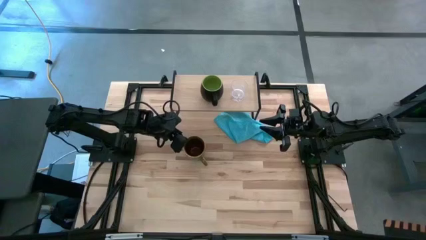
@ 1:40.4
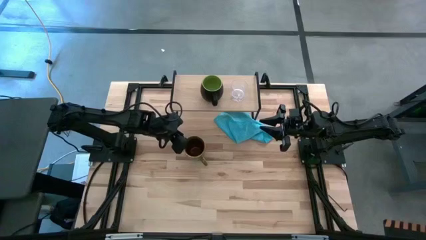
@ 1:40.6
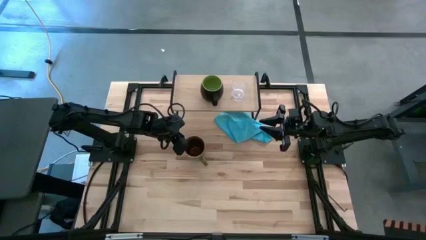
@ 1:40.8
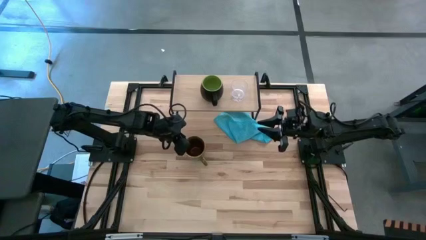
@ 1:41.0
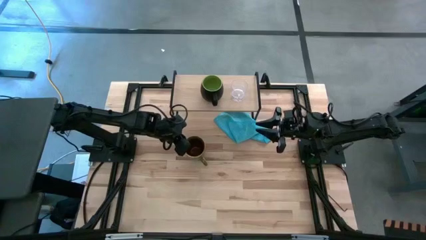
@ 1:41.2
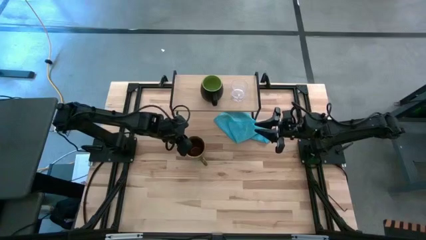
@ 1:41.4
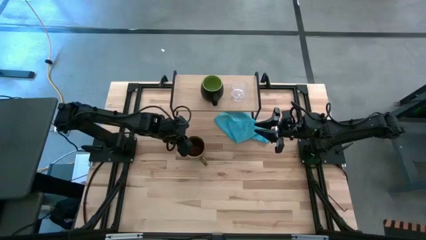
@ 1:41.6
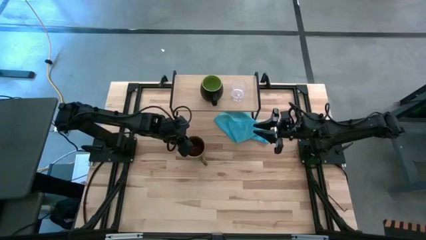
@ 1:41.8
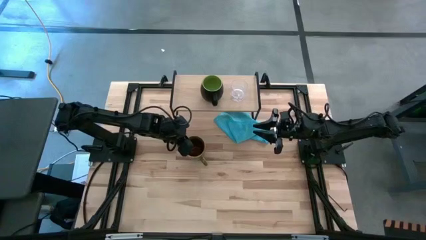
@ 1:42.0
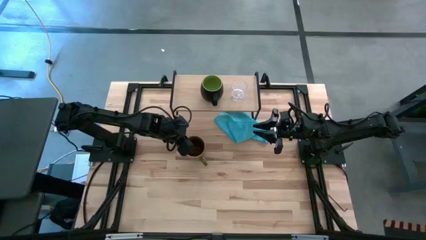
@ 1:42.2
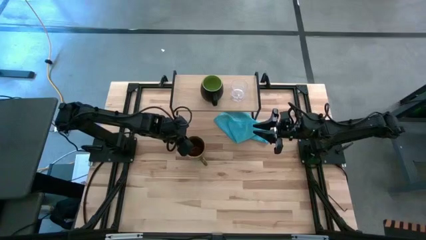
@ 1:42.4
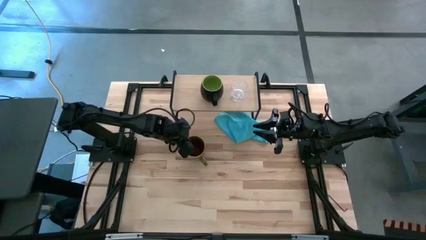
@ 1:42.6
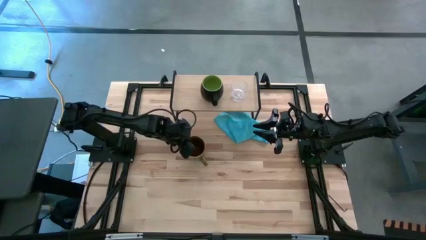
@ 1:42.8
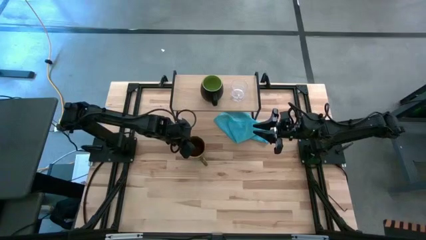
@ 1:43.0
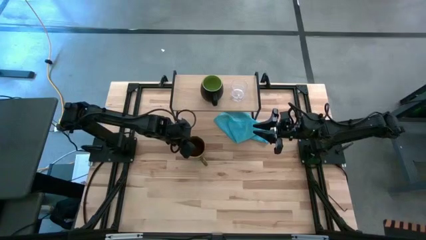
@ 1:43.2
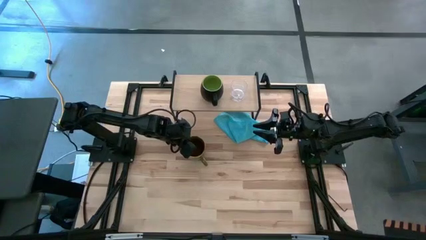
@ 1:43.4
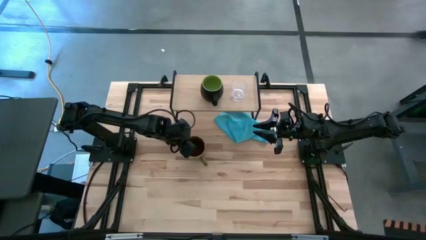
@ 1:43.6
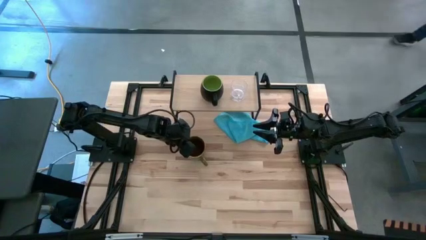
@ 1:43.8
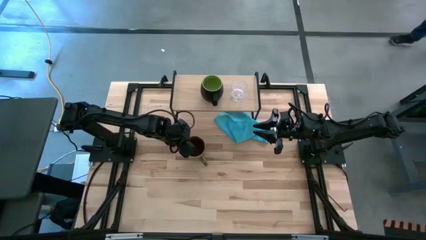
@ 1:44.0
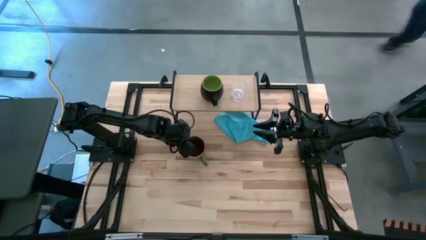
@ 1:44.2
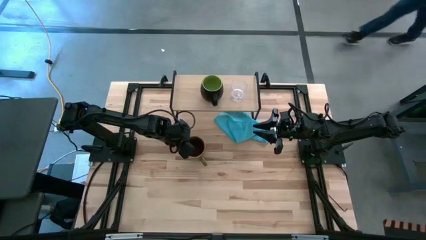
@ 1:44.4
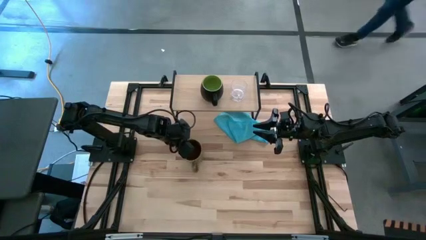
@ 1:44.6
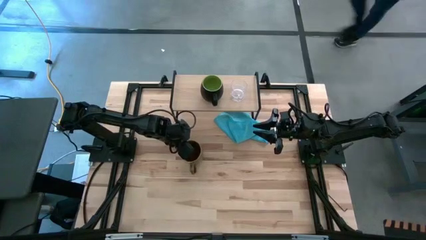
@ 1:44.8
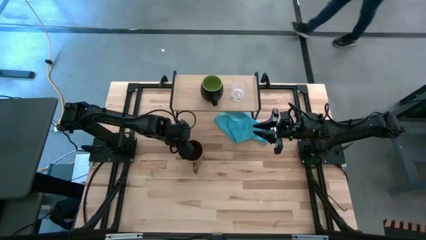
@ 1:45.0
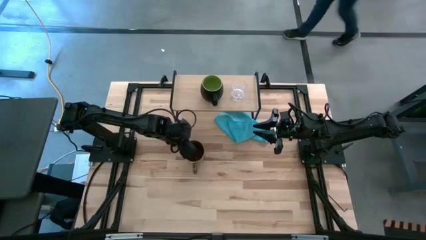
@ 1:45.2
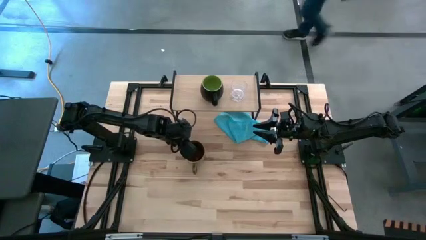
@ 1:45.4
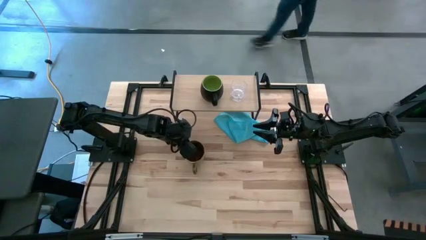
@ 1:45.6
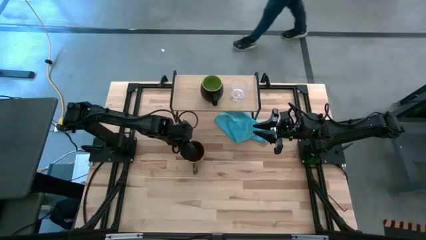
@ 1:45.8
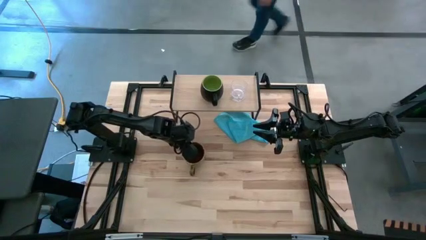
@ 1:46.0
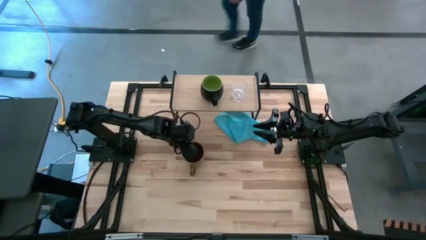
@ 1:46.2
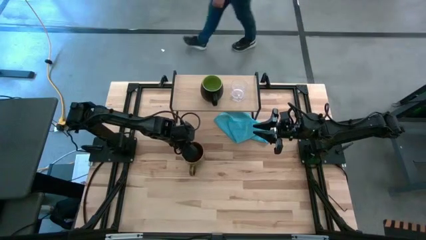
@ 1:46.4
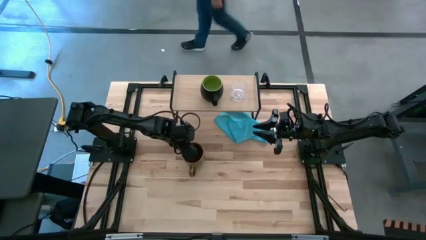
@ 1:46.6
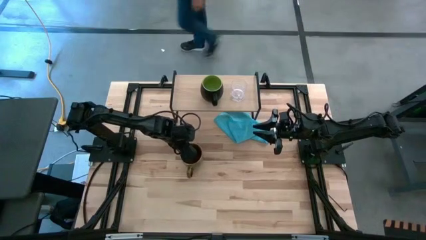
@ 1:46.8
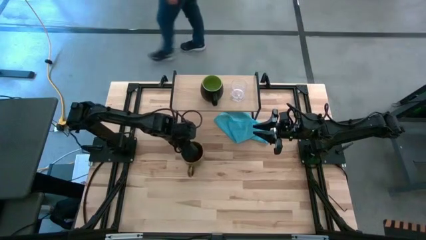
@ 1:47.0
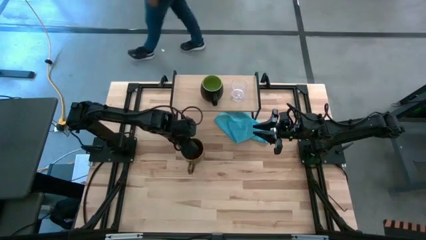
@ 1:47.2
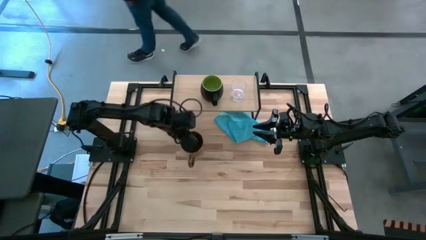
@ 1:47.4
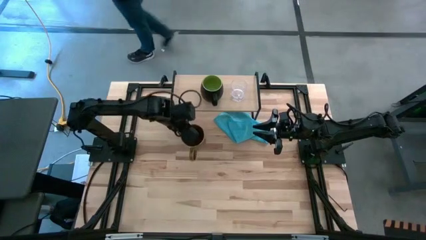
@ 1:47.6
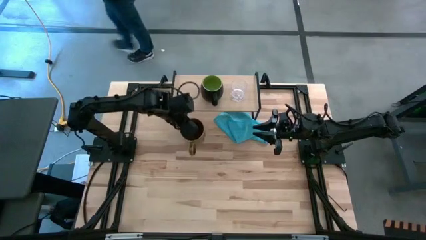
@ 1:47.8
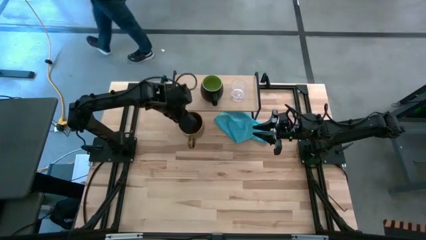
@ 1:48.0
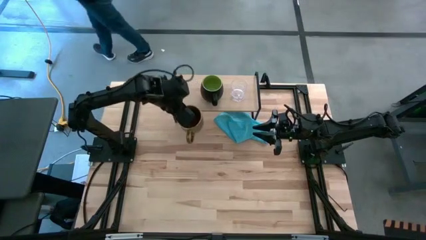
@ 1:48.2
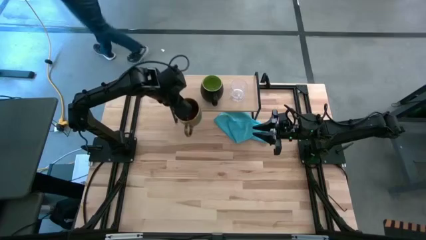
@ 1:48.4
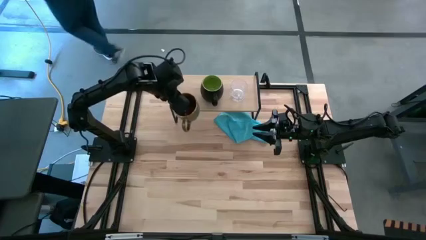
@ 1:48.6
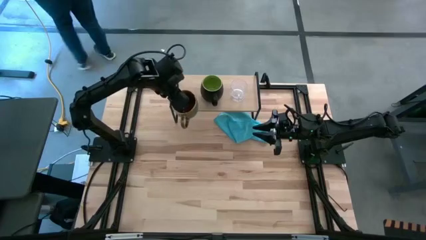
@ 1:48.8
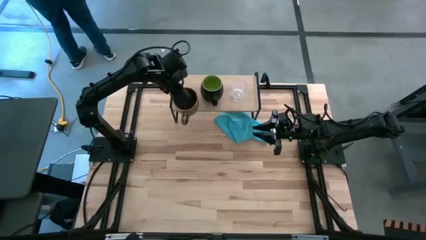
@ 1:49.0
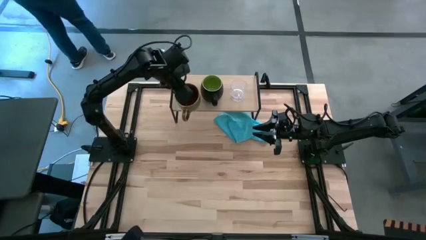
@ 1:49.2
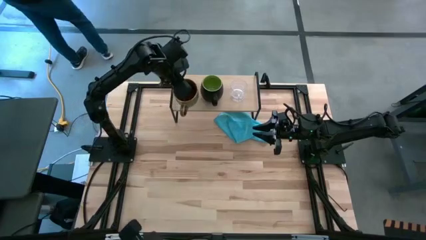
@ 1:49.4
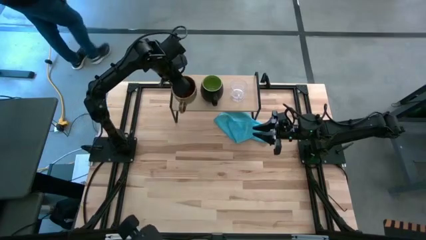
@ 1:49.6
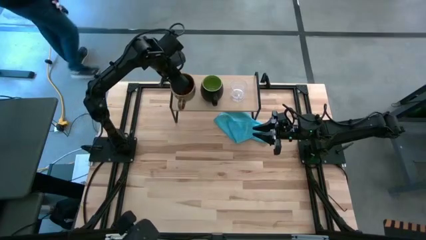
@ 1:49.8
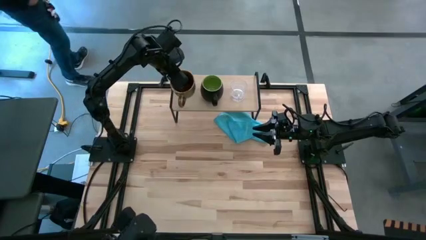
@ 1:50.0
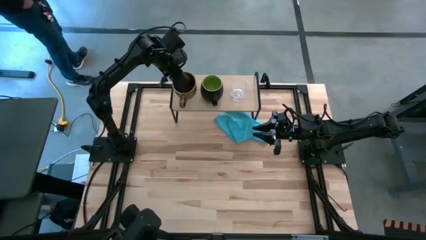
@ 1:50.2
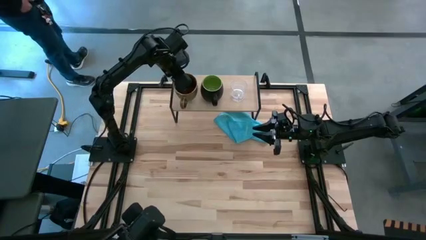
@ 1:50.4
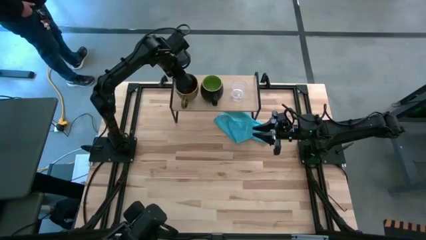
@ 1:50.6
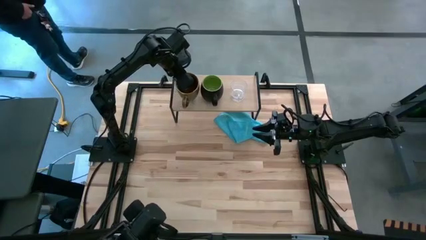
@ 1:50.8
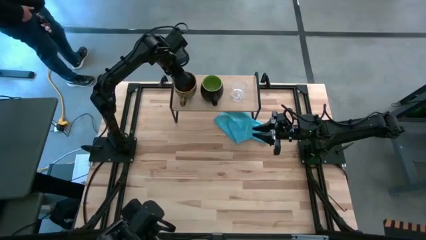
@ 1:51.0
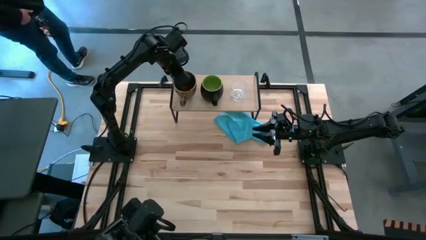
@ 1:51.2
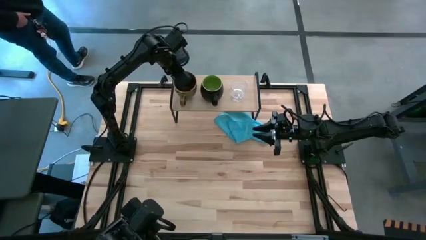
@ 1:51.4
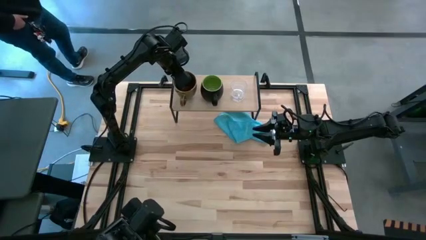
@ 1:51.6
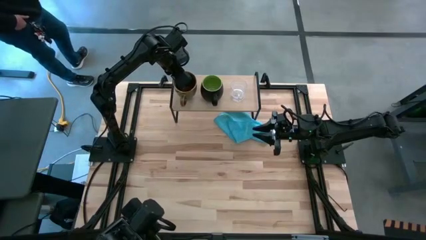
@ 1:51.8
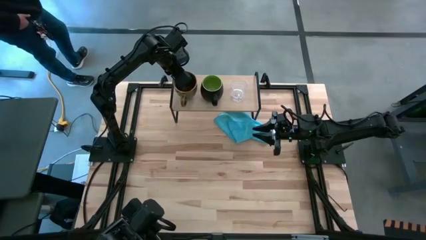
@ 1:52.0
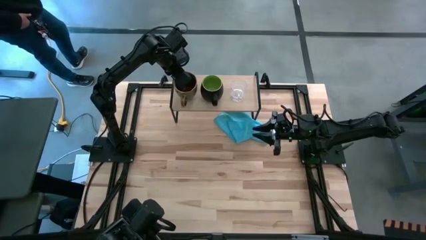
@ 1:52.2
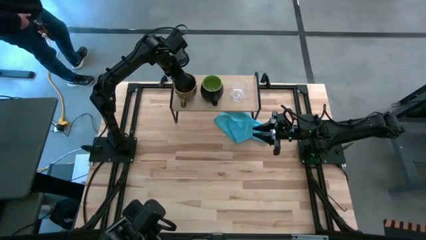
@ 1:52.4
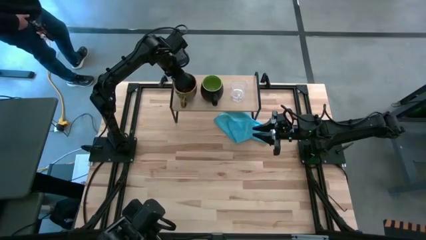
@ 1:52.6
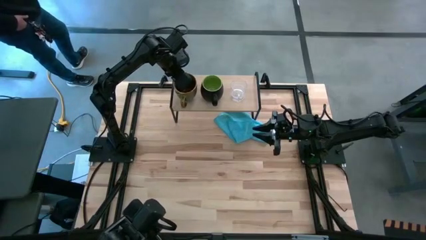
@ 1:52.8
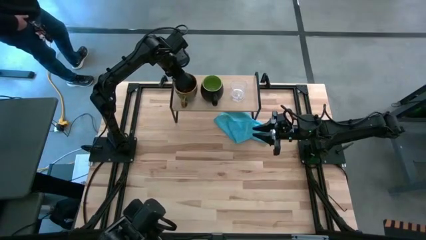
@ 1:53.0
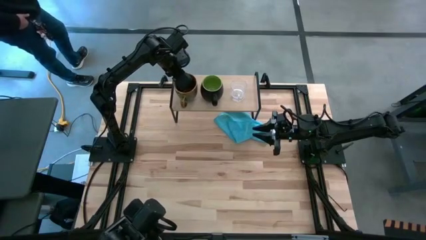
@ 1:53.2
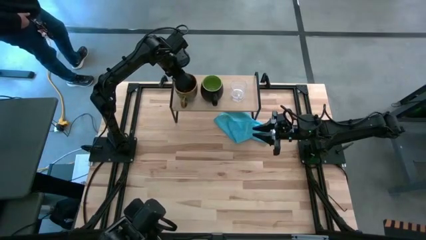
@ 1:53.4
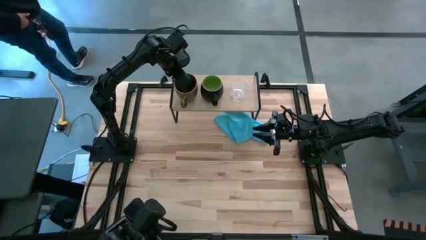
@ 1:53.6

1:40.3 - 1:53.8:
Task: Stack small to large cups/mugs on shelf
Put the green and blue mug on the shelf

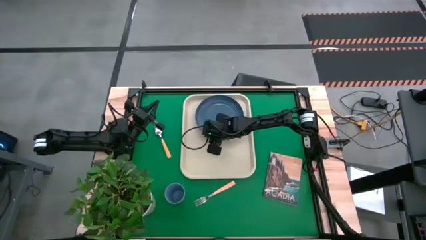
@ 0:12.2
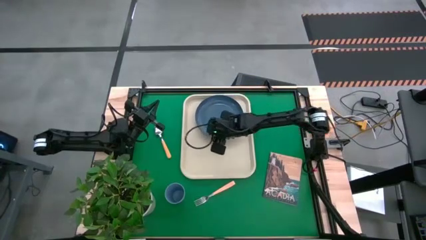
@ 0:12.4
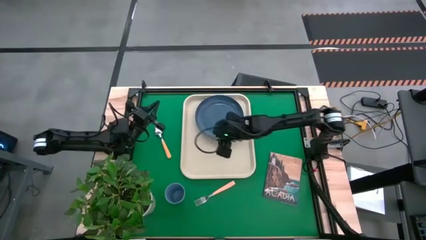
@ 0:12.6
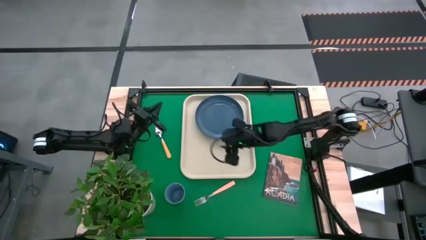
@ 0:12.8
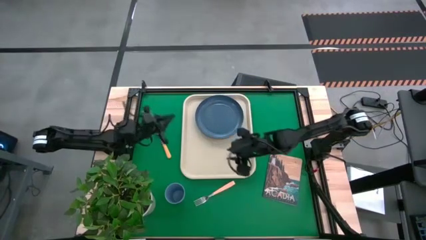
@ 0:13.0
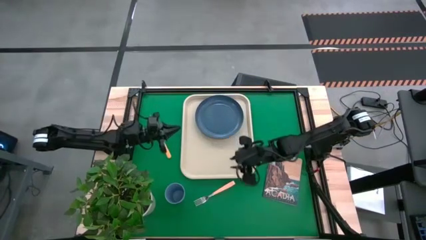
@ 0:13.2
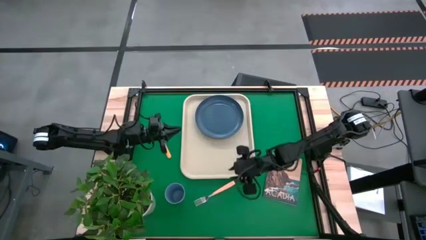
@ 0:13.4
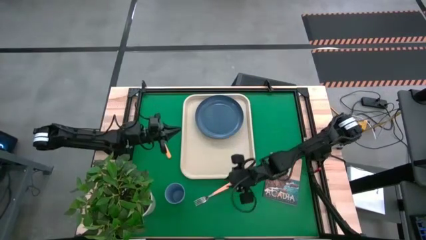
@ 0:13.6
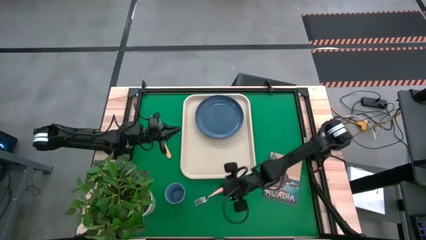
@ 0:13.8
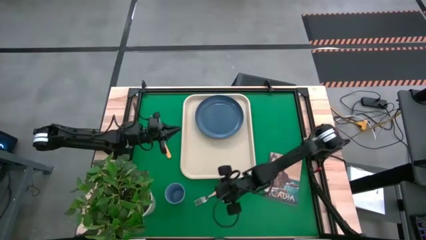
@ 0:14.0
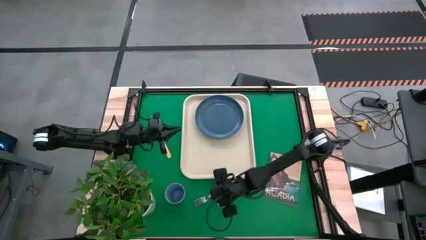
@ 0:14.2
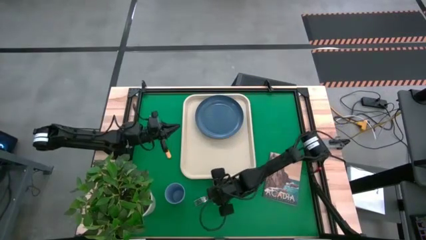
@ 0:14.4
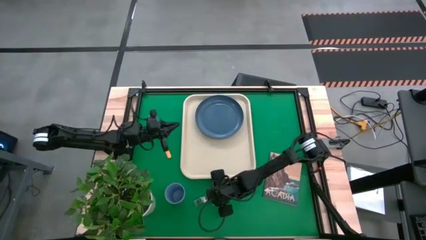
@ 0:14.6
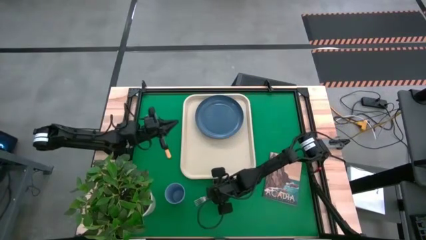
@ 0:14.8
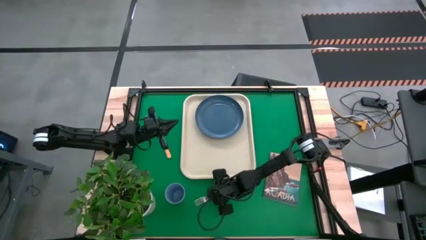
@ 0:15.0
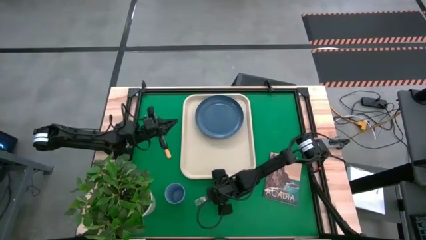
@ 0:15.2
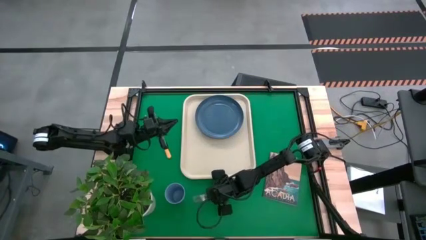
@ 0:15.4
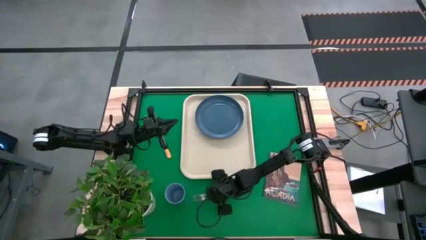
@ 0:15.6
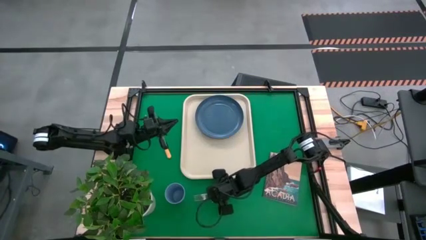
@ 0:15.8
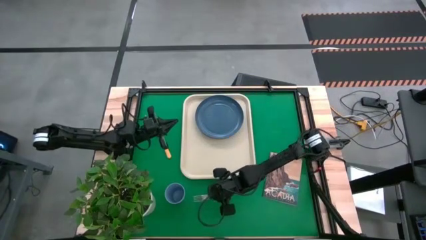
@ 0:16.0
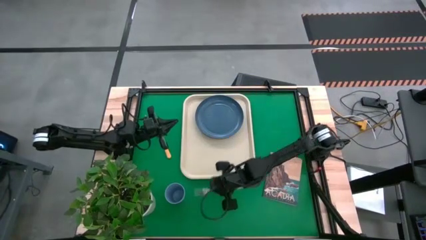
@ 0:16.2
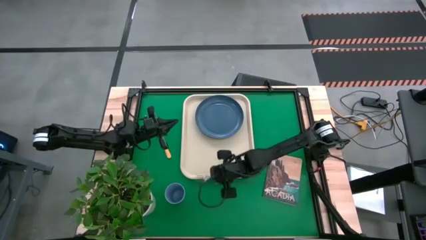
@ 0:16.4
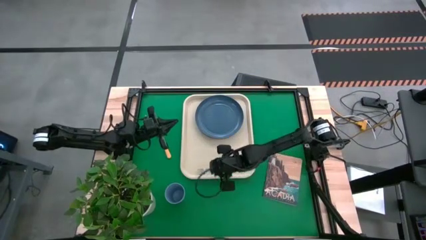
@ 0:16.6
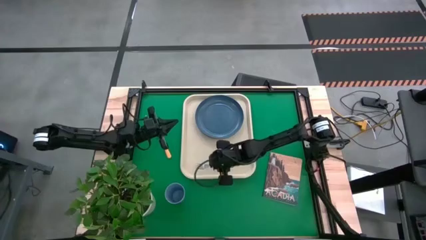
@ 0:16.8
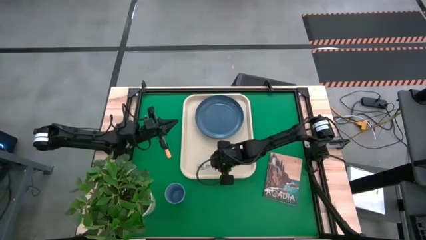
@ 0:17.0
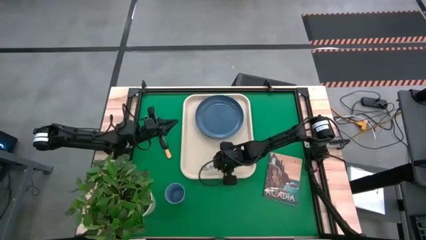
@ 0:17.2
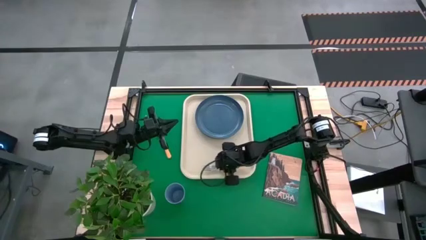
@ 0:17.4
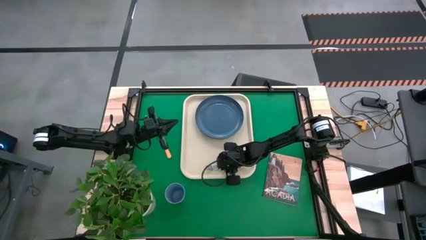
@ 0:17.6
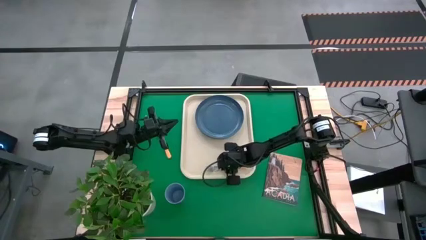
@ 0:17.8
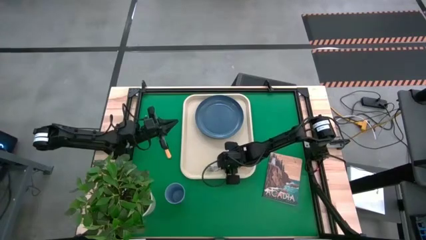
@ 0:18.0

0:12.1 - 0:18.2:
Task: Pick and place plate/cup/fork/spoon on tray
Put the yellow fork on the white tray to the left side of the blue plate
